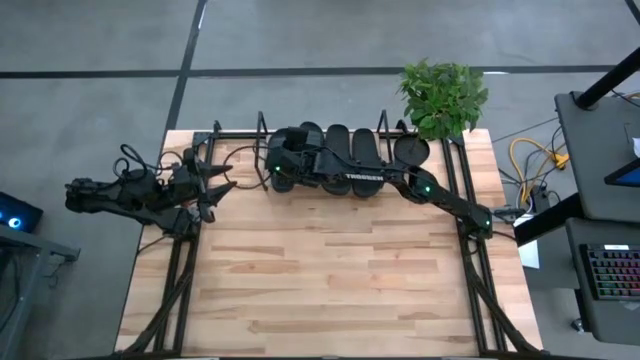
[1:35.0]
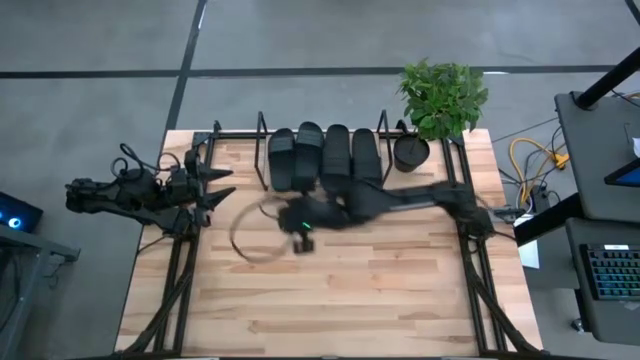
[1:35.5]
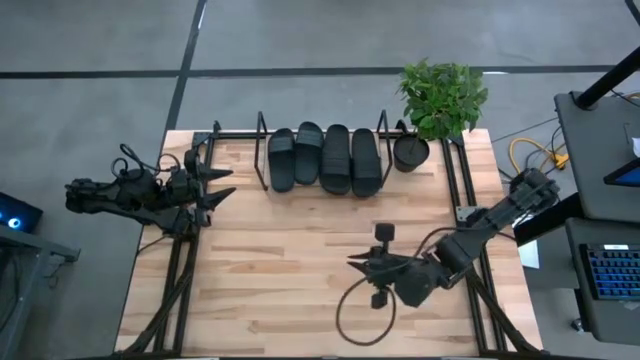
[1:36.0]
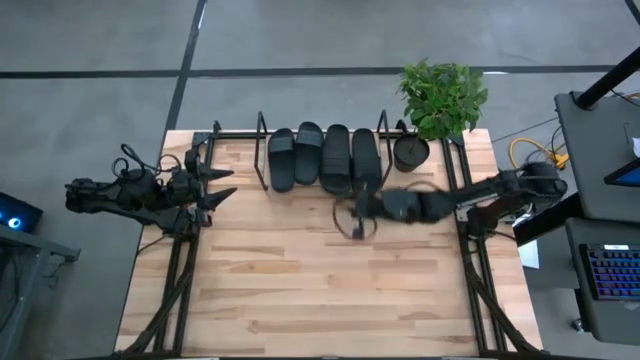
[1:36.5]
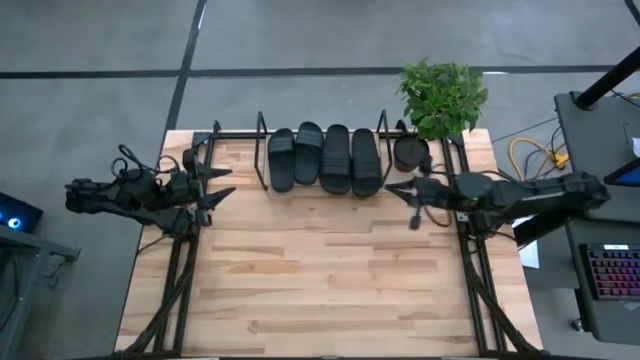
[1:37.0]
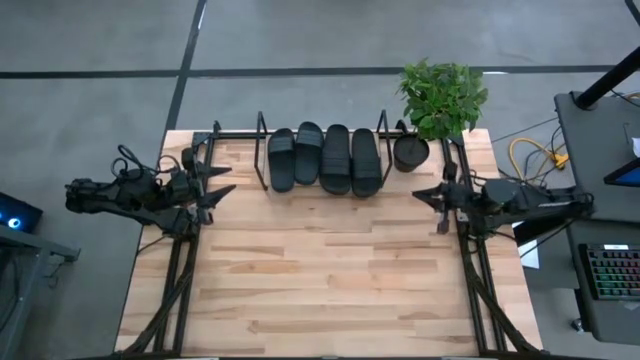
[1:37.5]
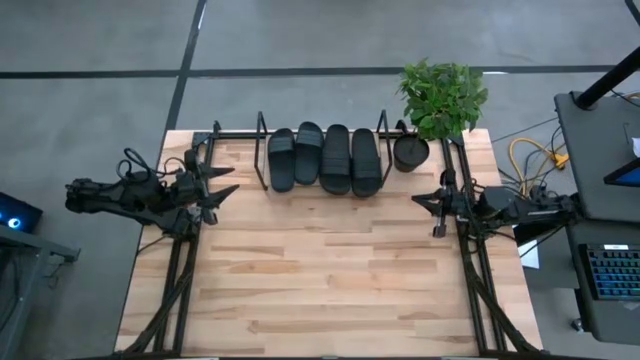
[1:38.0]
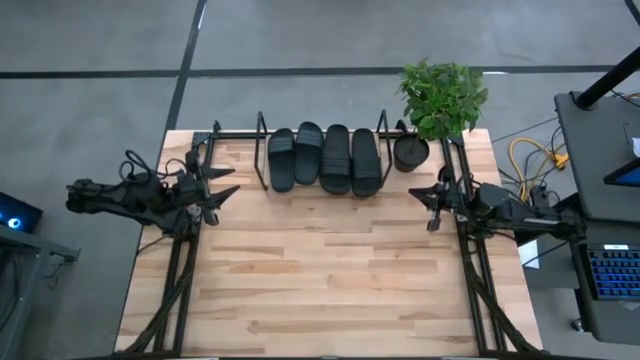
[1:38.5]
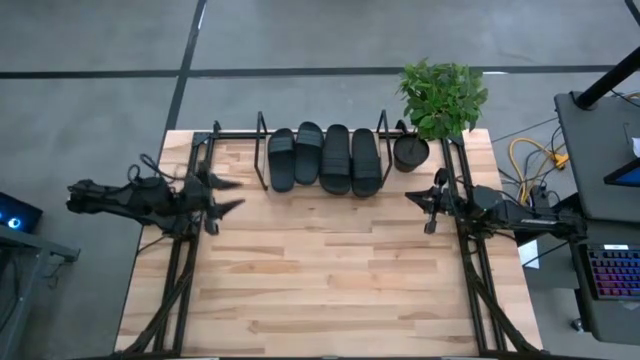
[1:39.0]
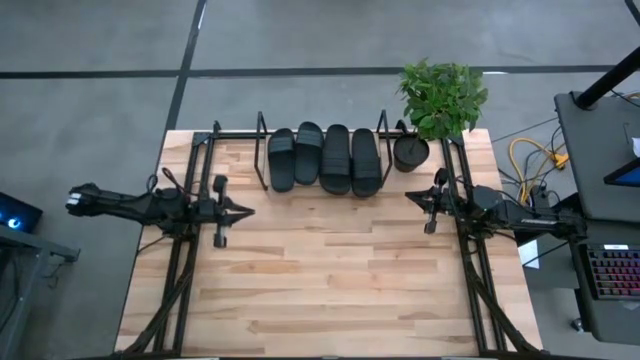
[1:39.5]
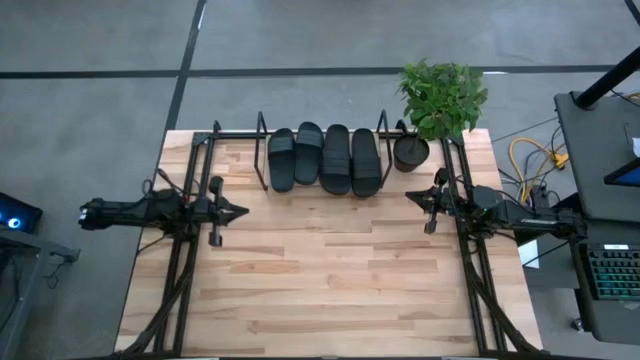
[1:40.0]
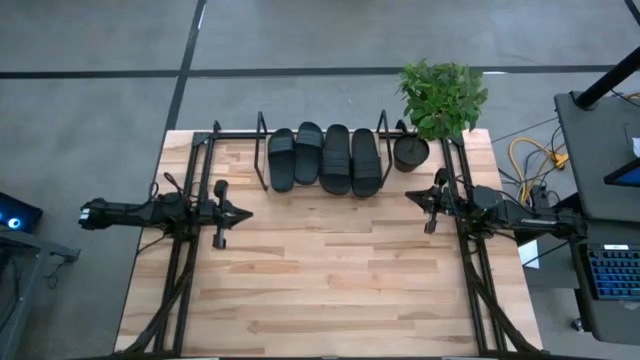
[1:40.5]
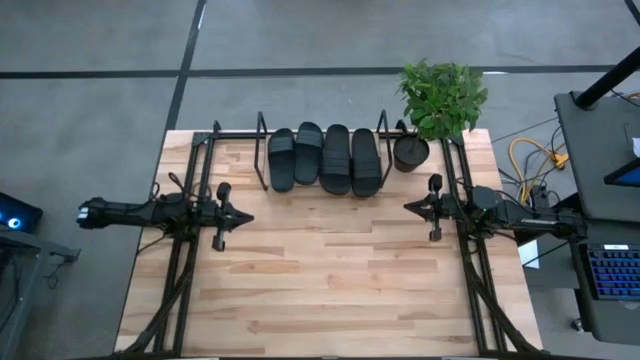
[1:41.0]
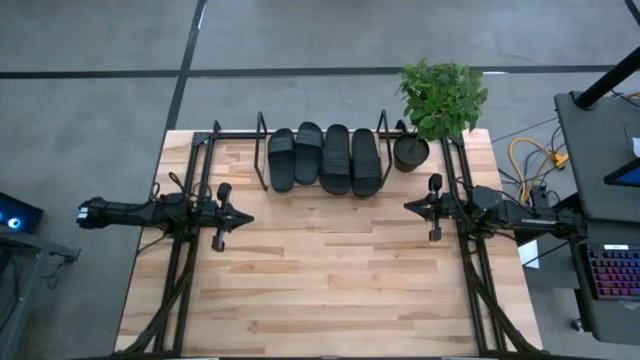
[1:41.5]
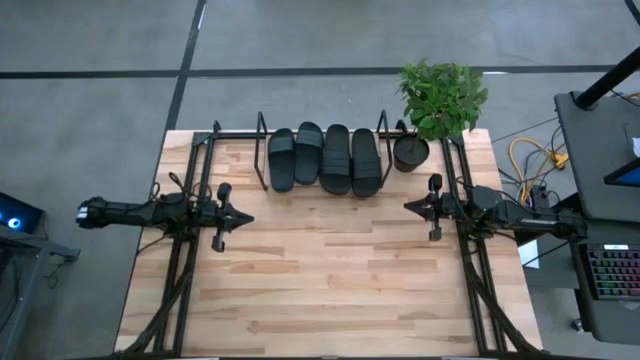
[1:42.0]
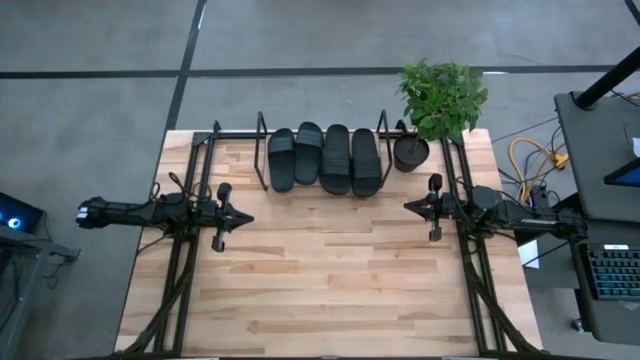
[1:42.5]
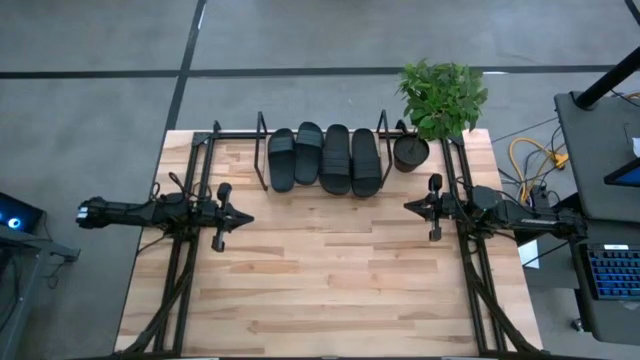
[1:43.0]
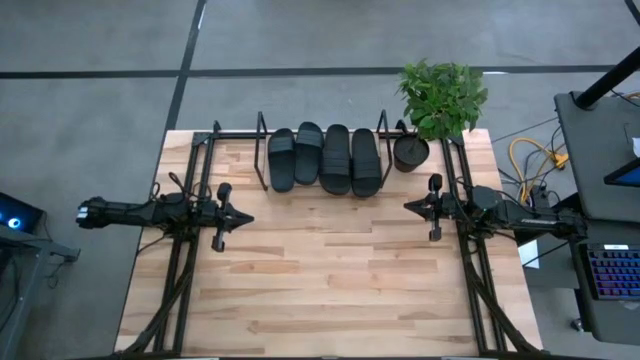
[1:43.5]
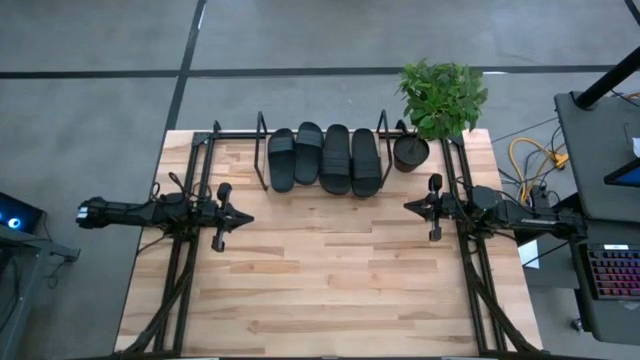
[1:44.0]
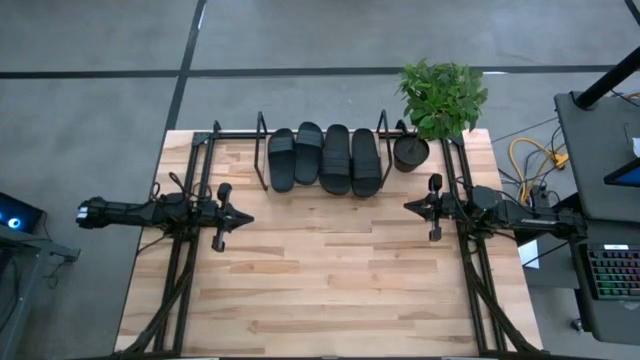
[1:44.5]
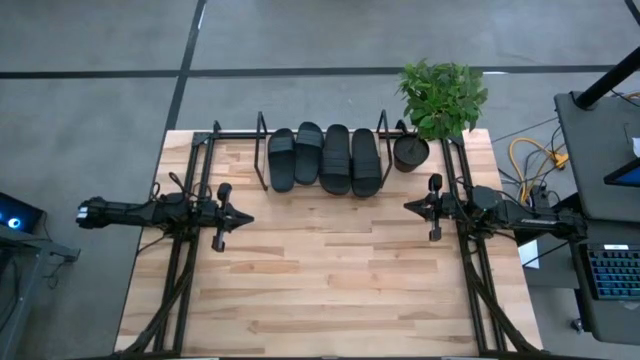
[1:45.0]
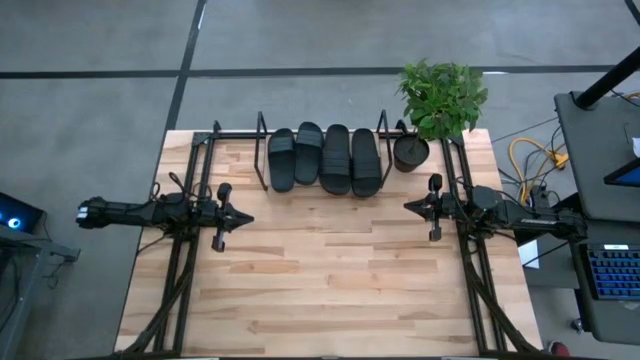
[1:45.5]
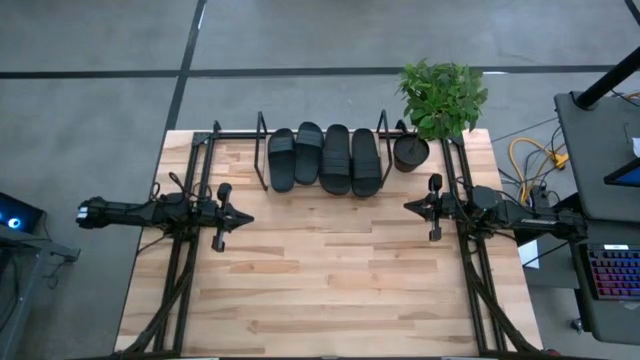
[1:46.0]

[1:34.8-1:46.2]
Task: Pick and place slides into the shelf
Return to Home Position
